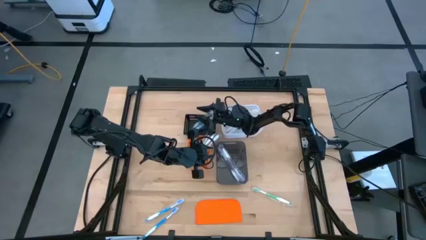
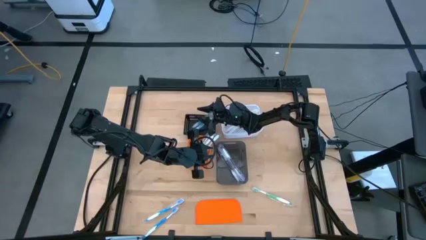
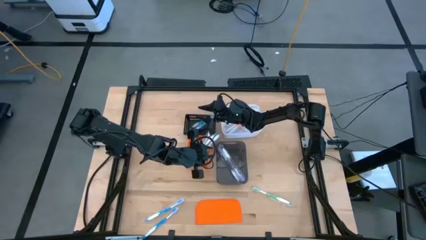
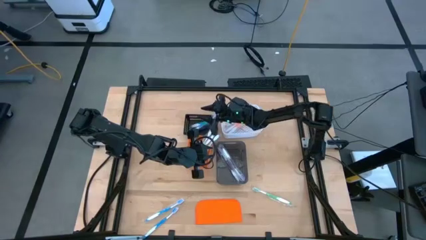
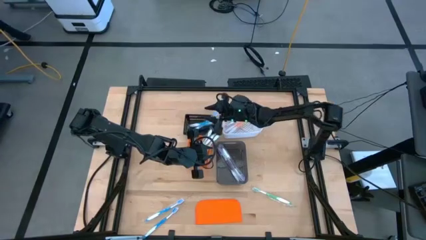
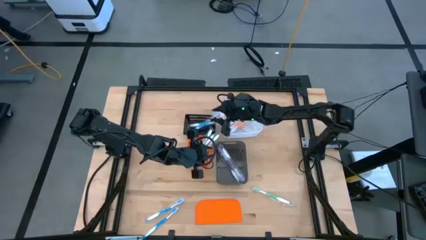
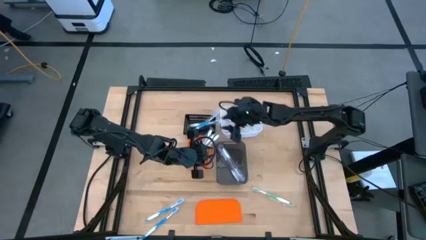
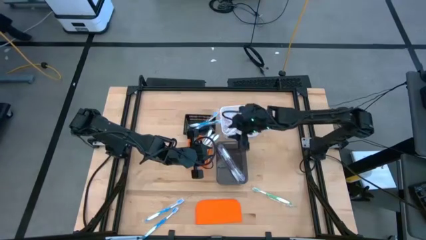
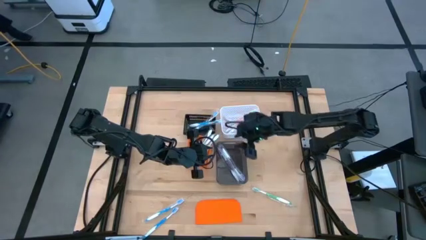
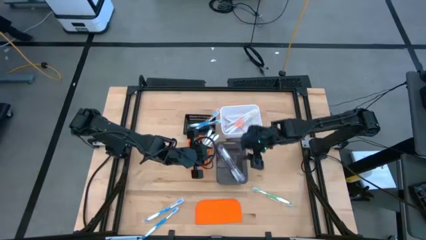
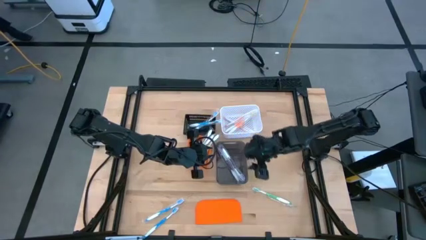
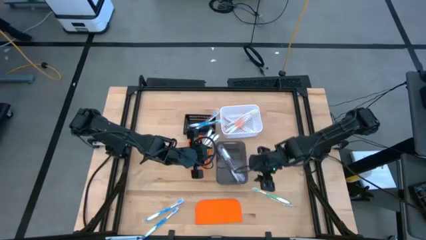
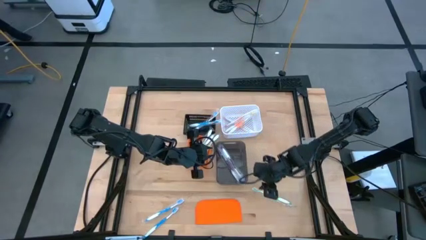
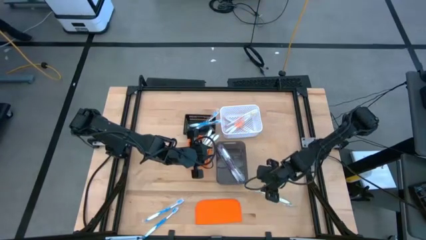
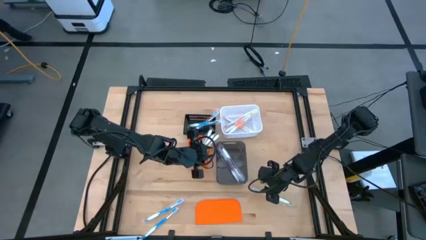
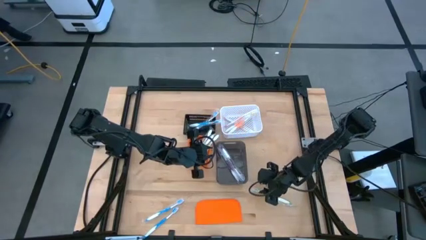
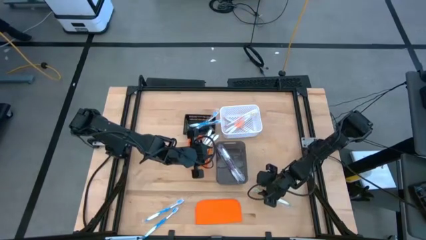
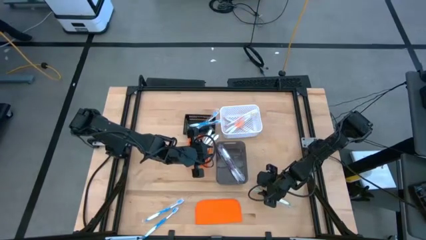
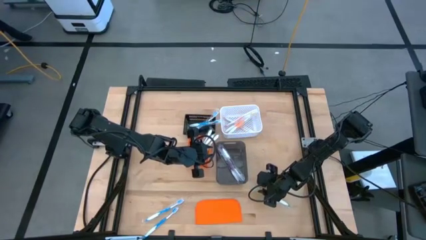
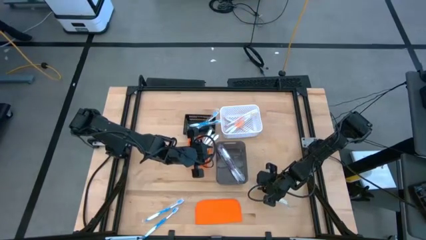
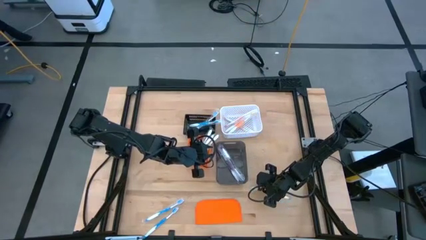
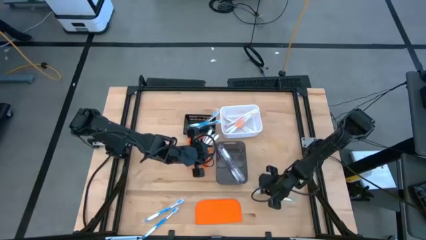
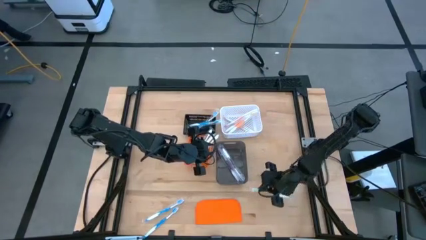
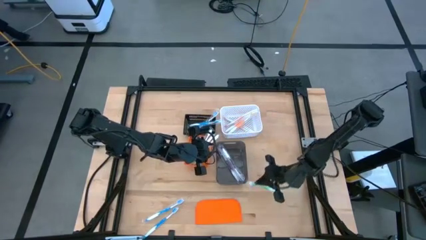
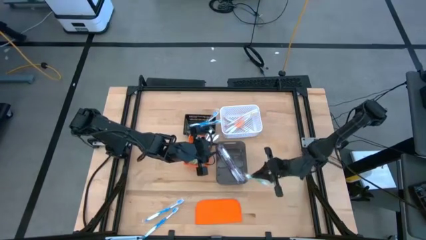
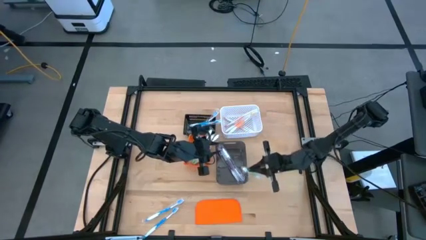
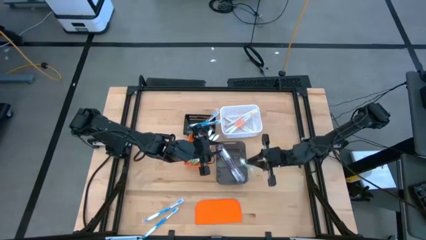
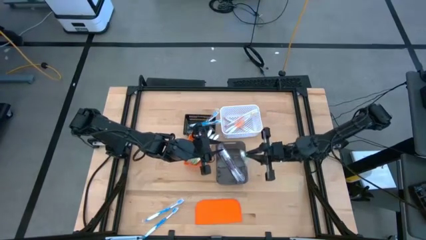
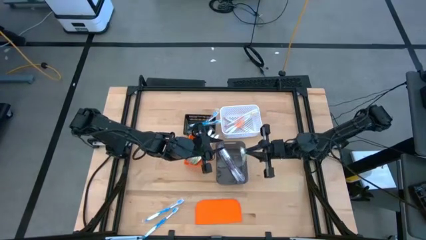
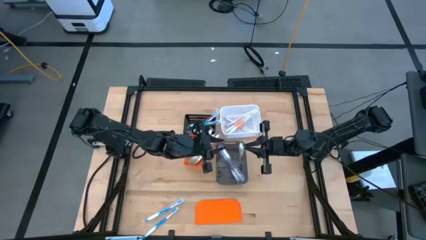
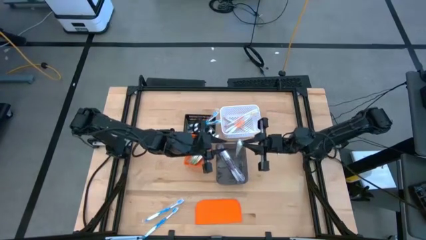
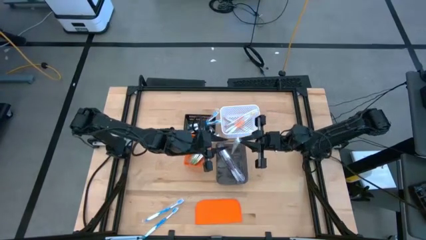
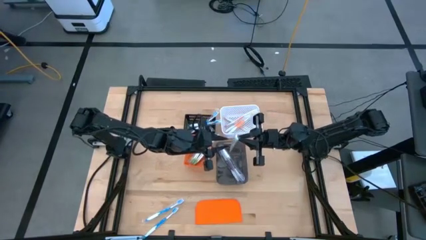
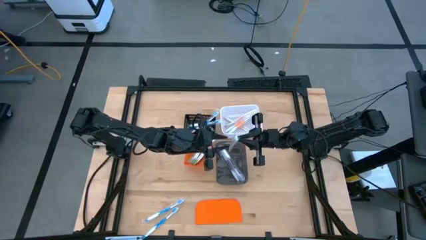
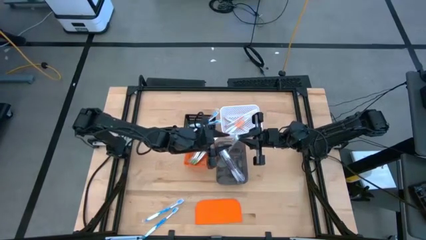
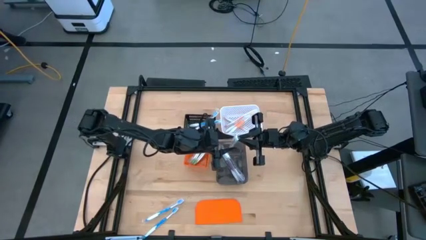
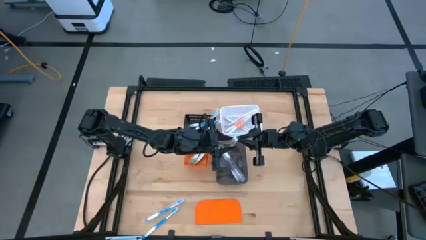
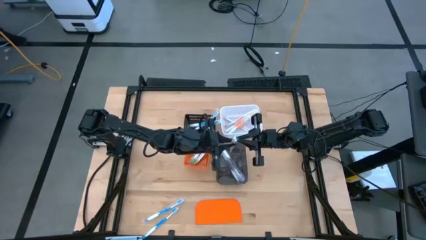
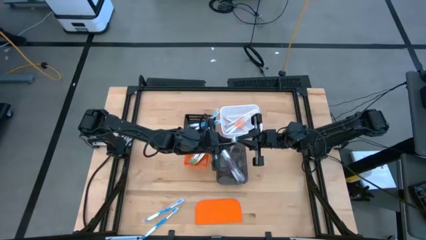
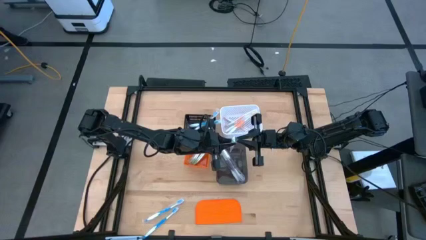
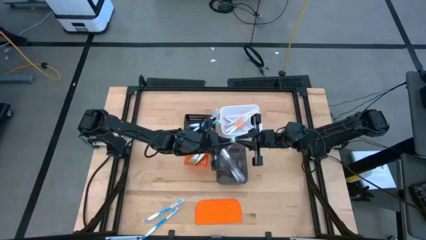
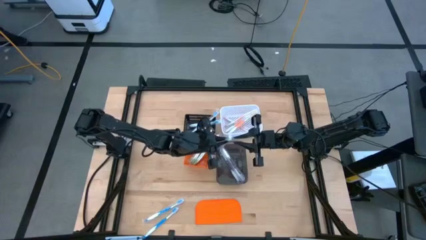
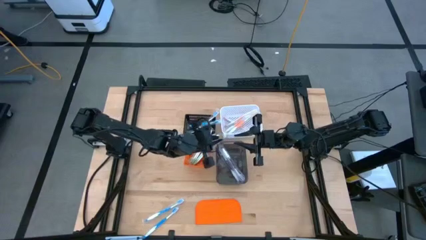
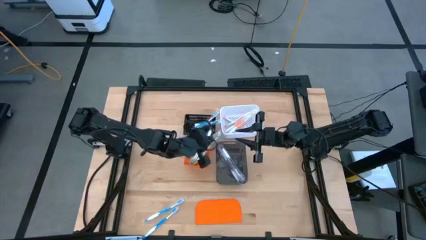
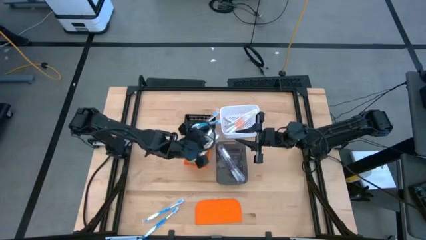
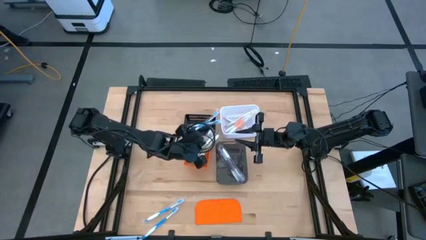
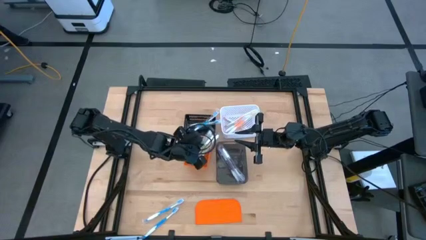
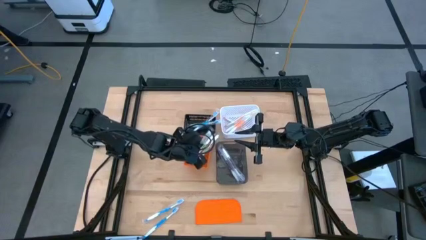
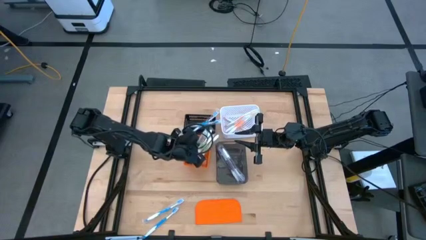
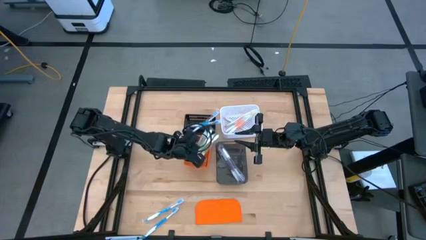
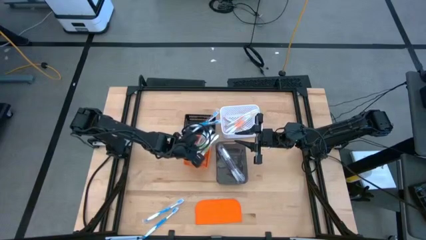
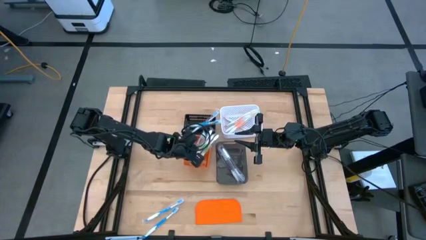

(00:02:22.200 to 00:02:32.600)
Task: Pick & Place Toothbrushes
Put the green toothbrush into the orange bin

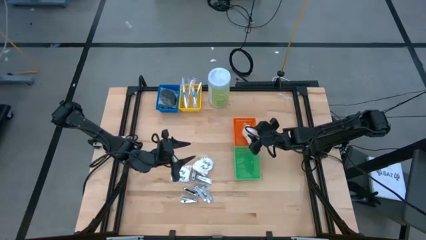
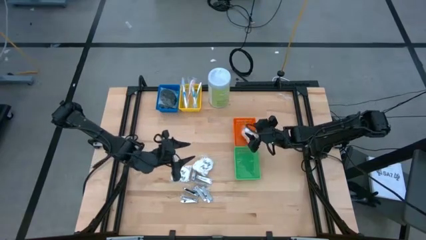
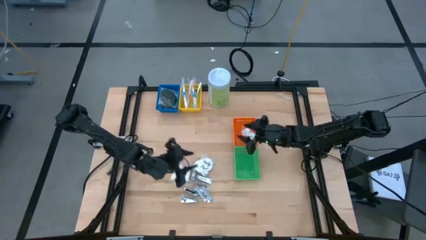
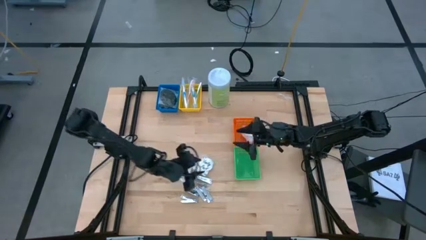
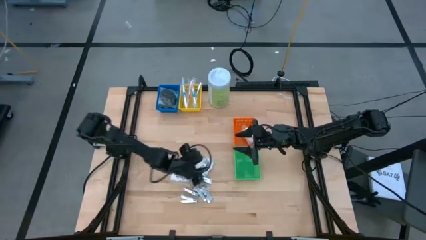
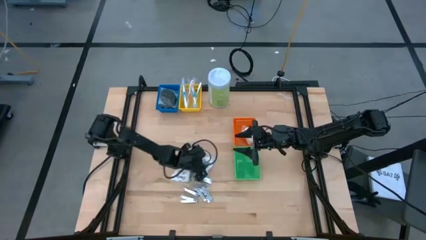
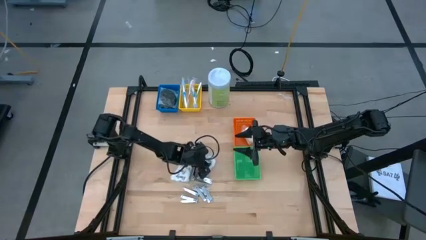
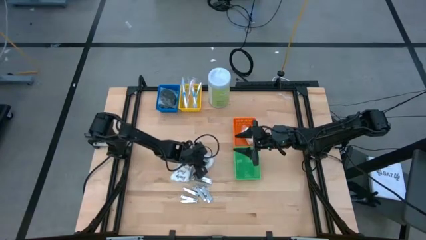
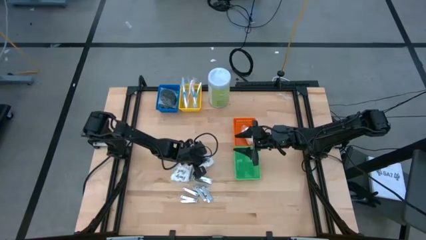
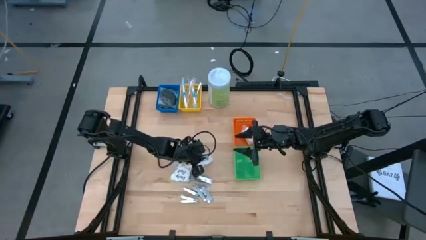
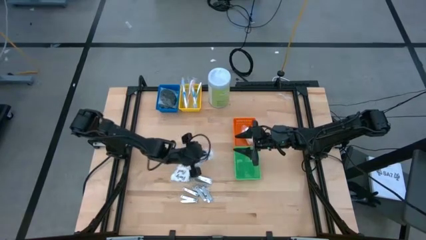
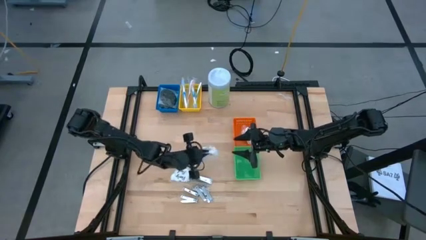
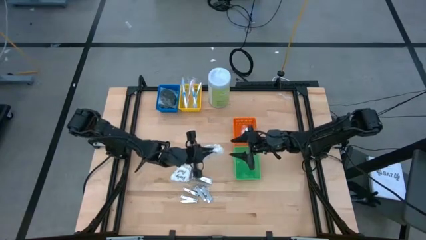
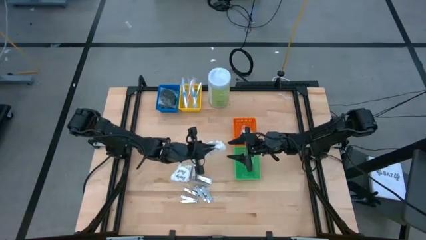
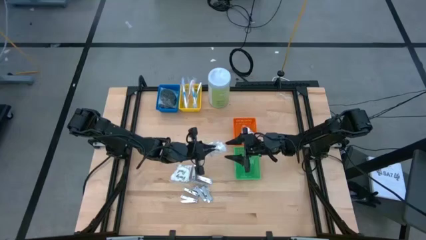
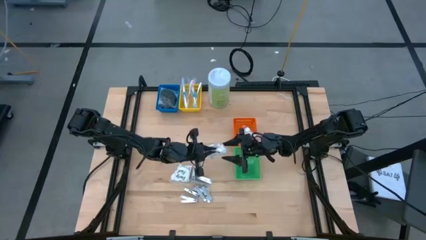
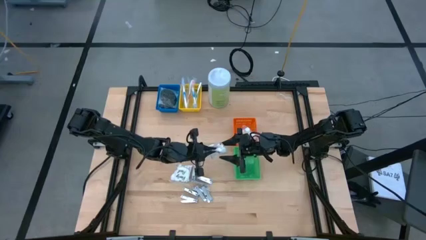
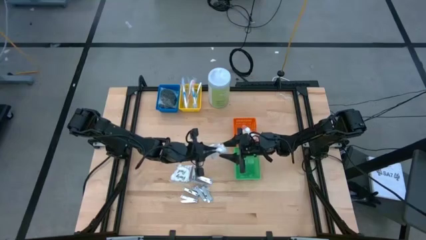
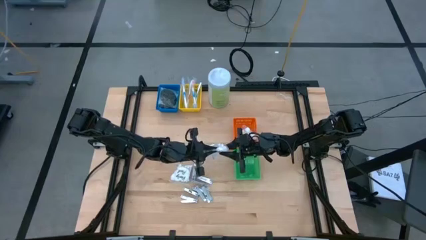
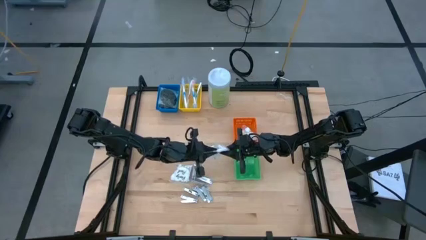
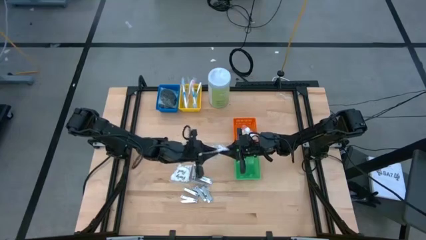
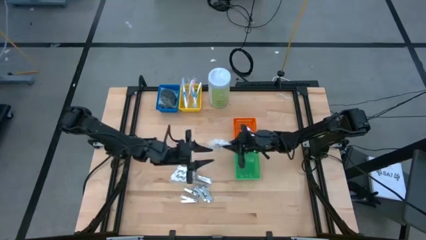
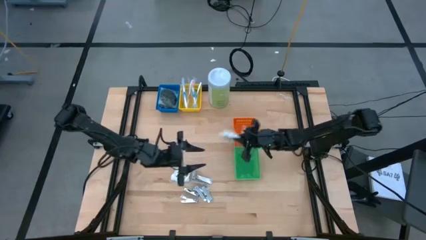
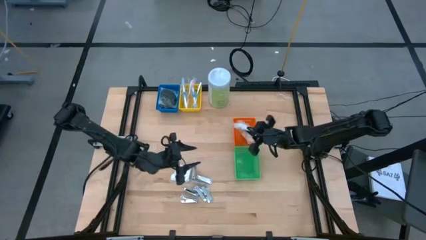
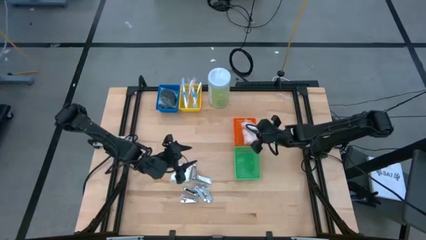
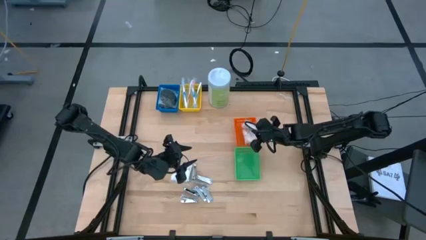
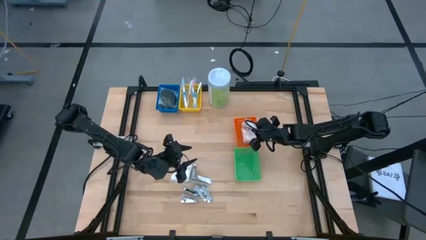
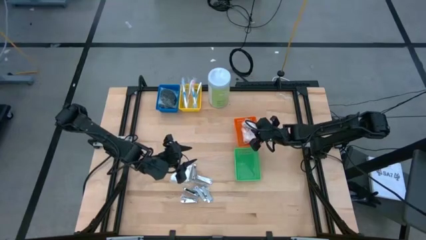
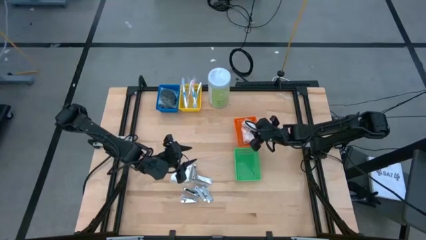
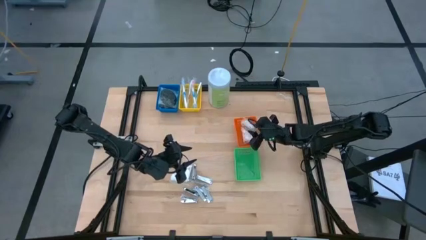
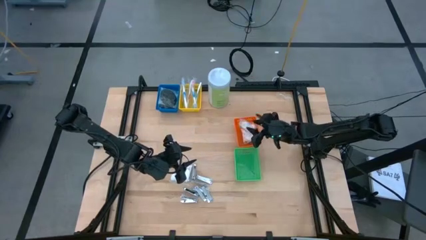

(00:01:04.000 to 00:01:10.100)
Task: Pick & Place Travel size toiletries
Put the cotton pack into the orange bin

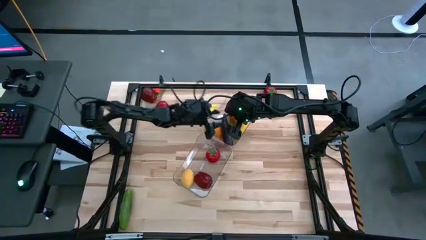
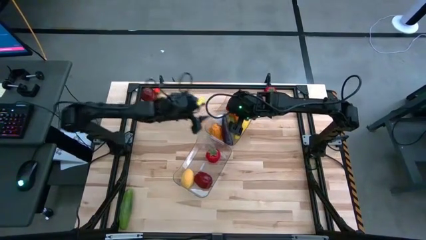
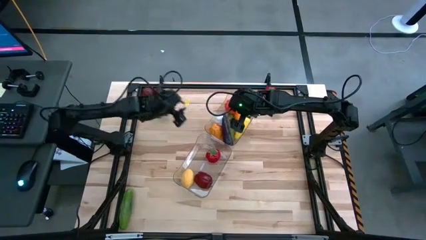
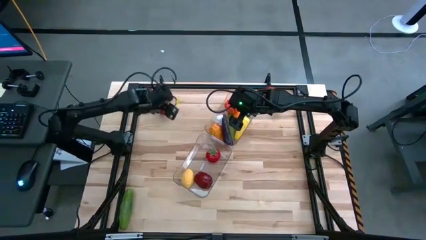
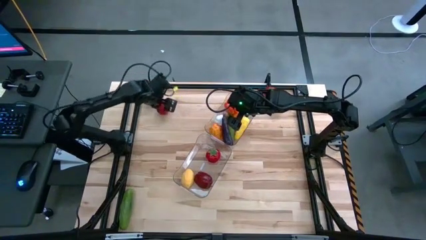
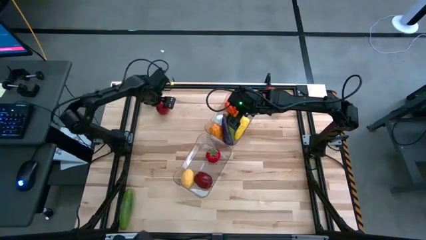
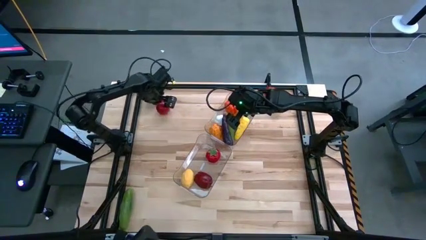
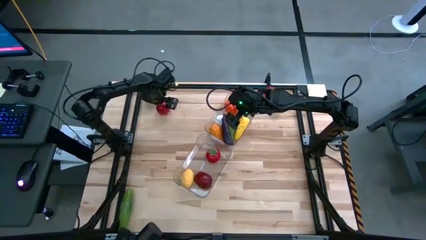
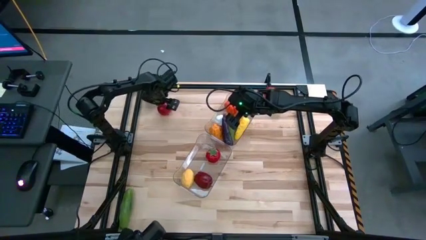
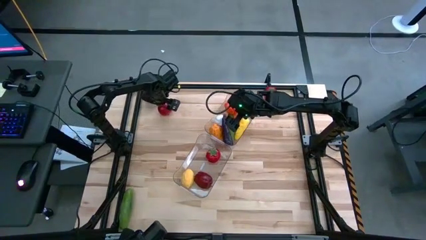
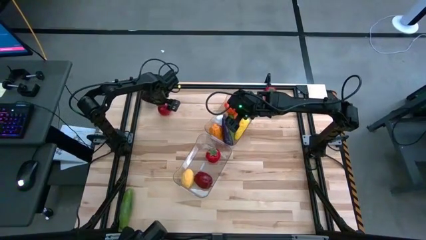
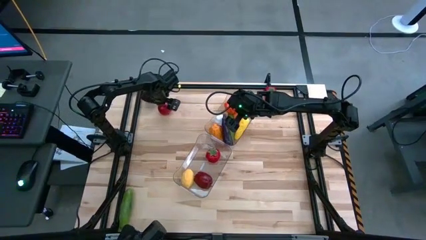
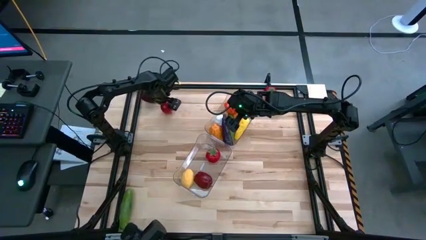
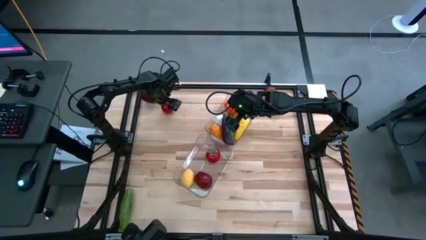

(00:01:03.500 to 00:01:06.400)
Task: Sort produce into baskets
Put the left red tomato into the bottom transparent bin
